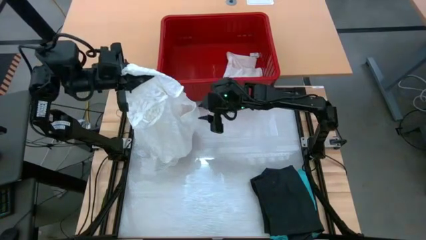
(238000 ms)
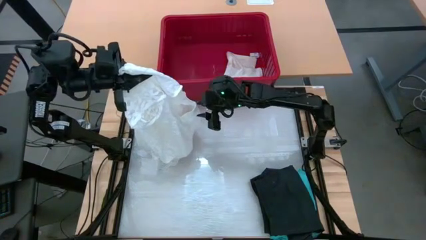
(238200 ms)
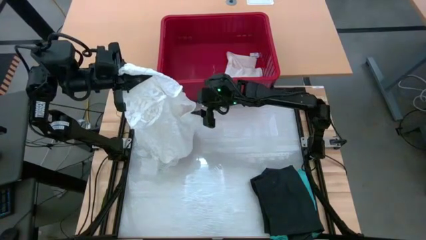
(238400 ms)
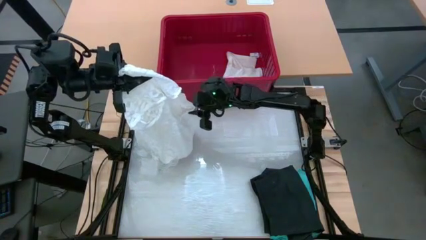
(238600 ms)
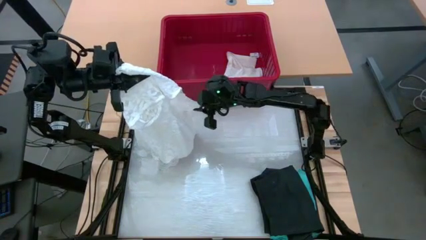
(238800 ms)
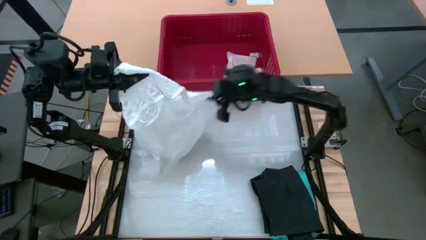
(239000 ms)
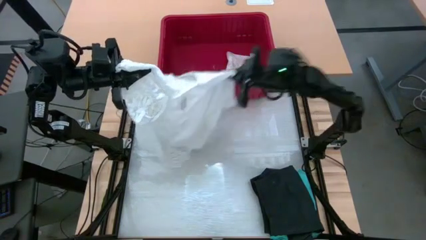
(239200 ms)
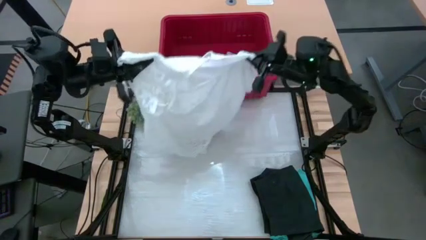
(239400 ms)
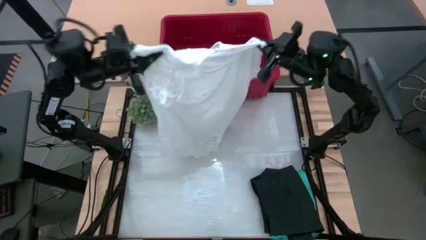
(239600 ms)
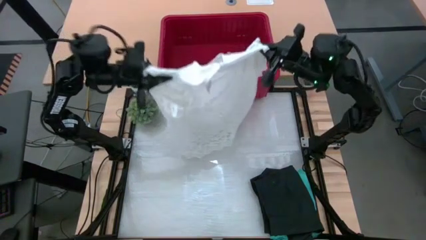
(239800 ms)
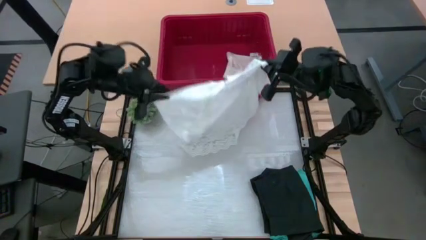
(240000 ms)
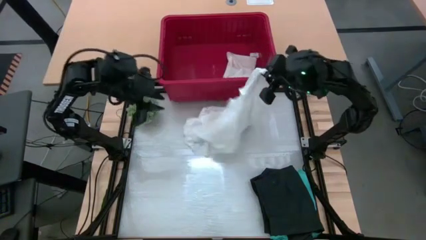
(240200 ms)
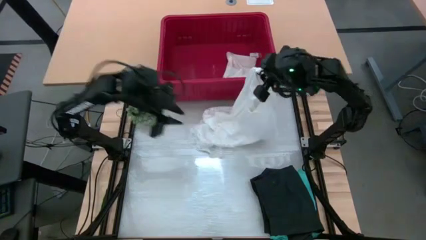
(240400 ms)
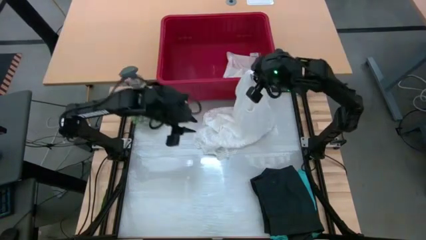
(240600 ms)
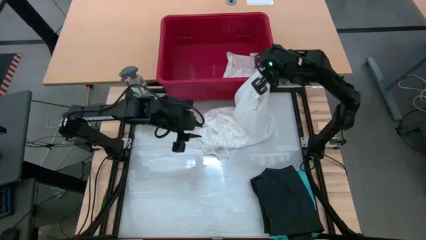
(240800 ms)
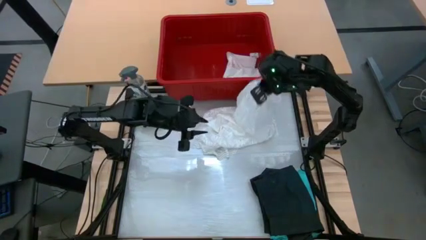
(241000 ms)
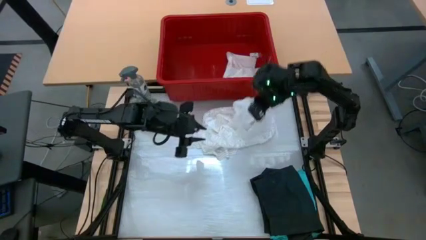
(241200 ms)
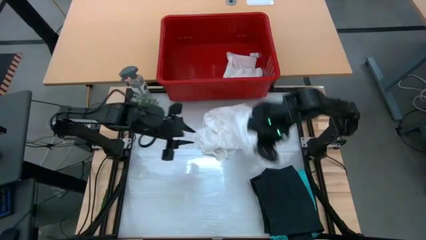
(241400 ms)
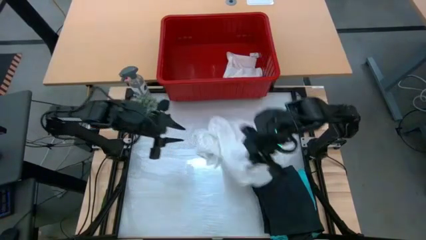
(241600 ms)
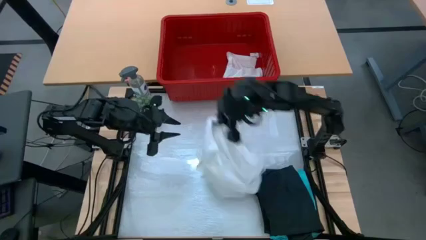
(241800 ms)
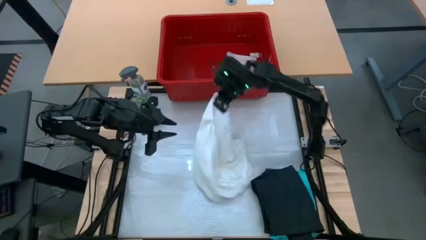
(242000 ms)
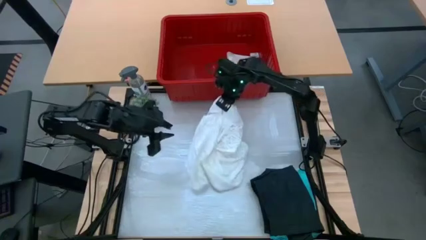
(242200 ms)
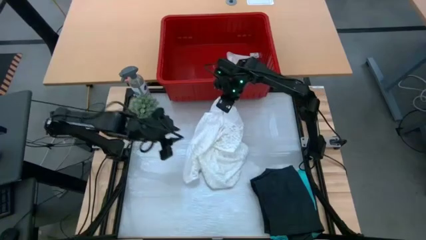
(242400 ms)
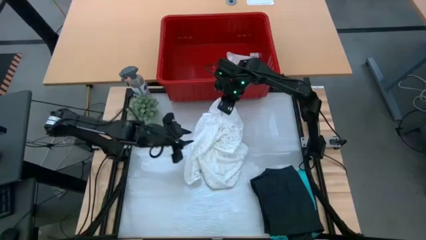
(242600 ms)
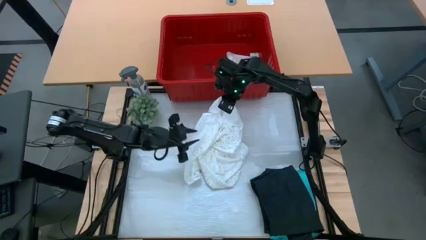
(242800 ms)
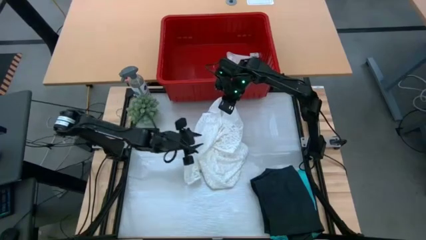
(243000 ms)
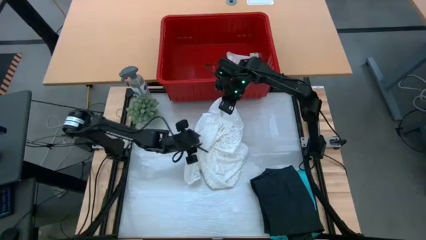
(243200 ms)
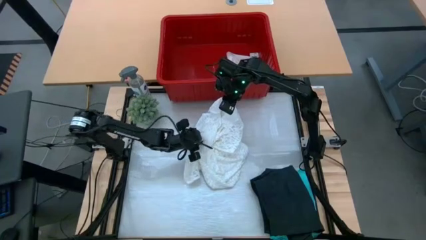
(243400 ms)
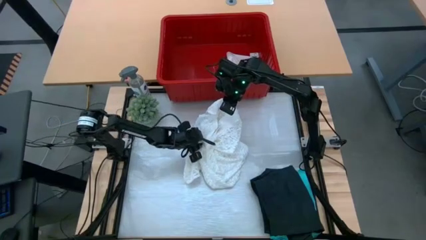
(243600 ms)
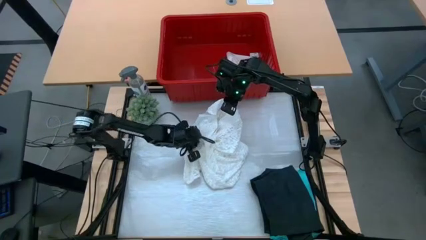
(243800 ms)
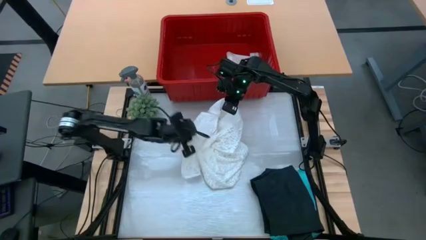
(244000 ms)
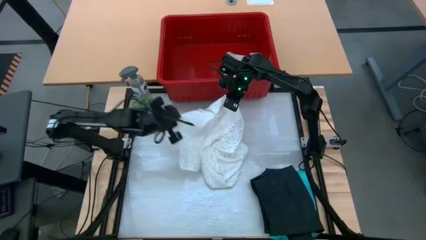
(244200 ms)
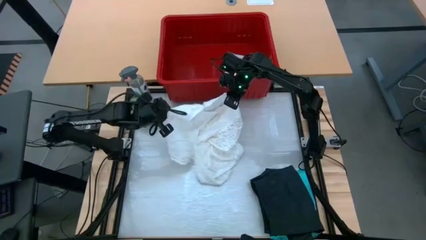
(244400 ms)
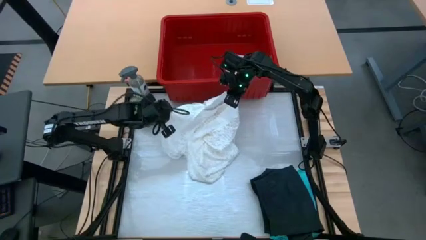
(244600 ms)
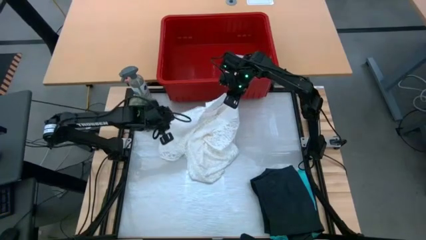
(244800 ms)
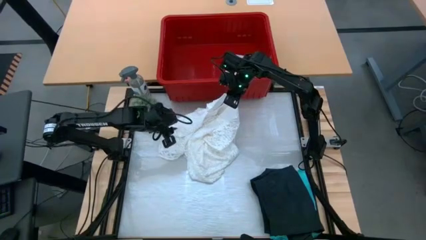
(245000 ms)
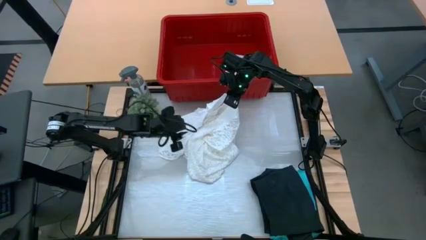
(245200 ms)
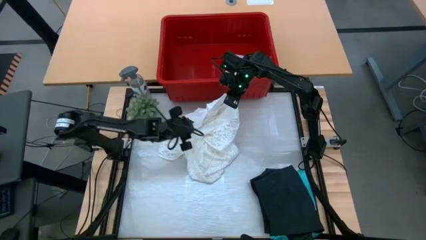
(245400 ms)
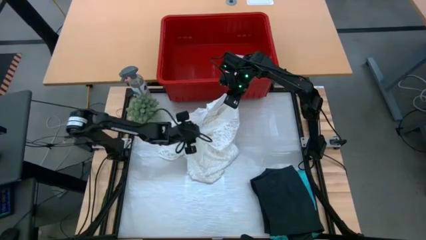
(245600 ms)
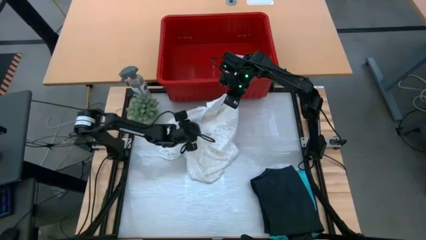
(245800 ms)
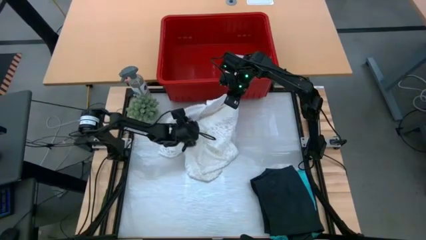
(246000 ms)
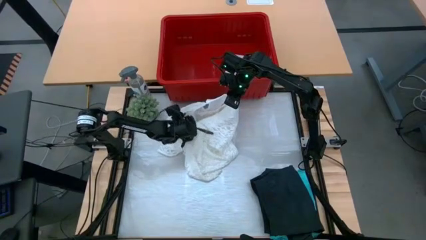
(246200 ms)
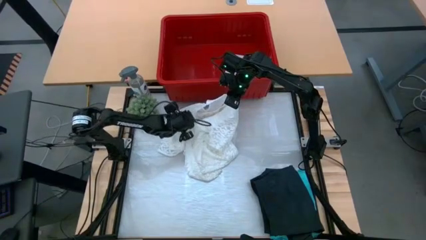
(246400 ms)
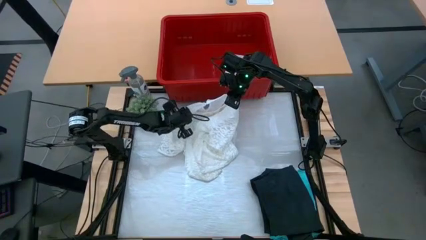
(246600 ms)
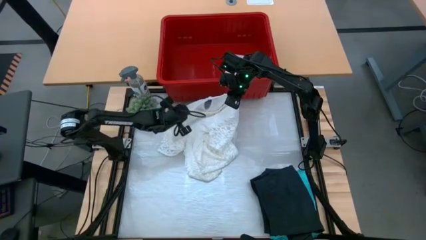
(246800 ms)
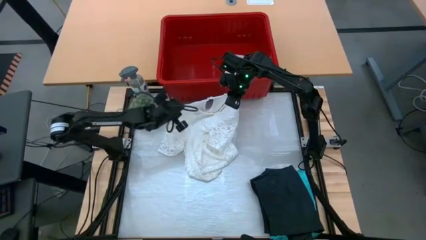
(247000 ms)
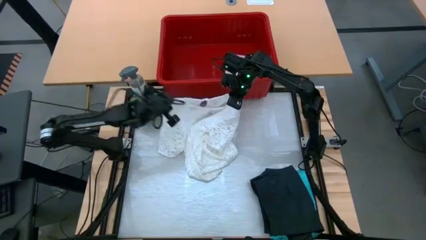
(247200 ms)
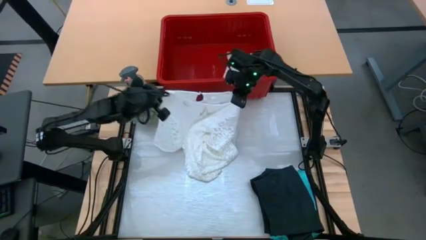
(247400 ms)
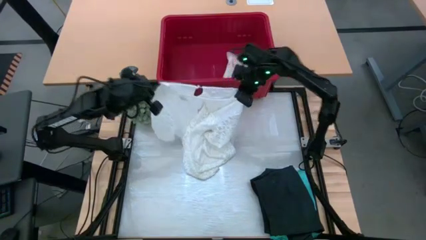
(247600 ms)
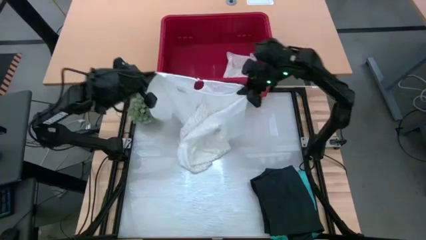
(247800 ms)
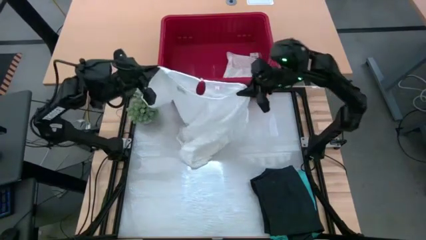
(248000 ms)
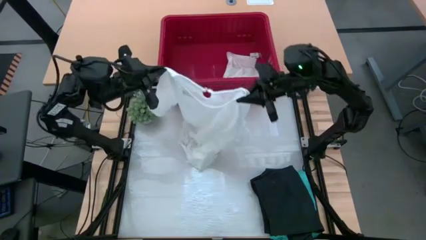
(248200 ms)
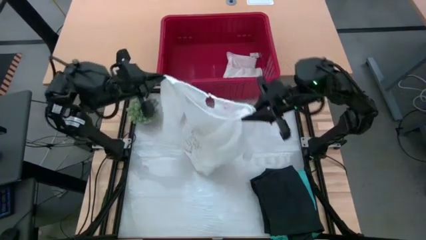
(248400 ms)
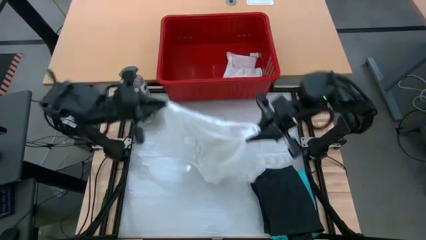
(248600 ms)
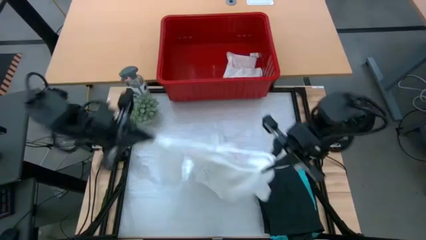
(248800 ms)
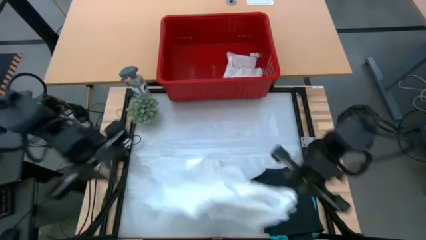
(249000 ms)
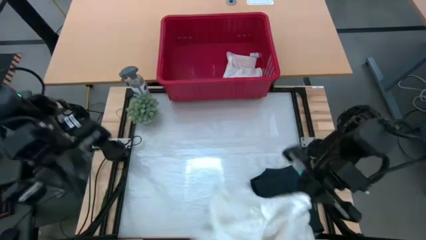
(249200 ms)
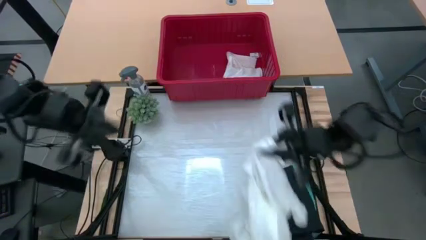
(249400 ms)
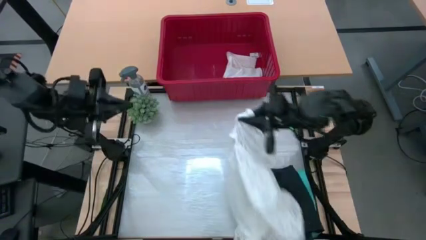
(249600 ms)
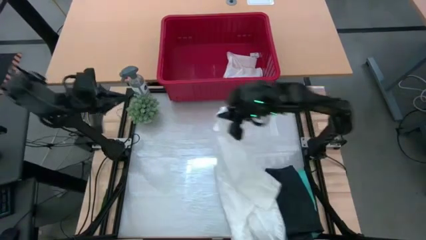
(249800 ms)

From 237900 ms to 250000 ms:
Task: Fold Laundry from Bin
Fold the white t-shirt

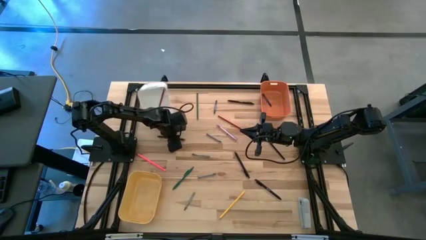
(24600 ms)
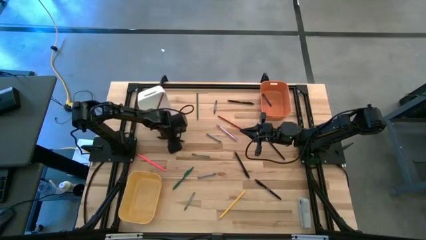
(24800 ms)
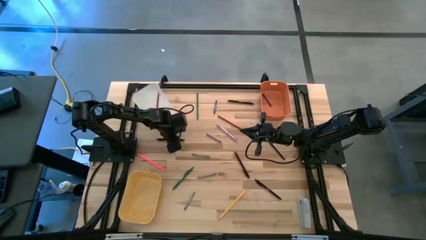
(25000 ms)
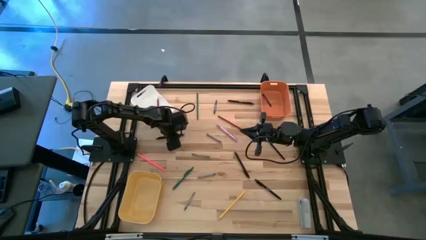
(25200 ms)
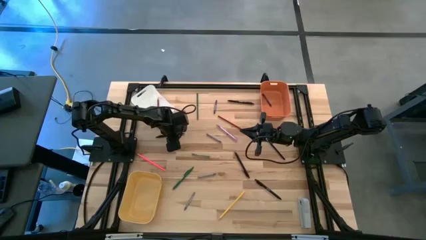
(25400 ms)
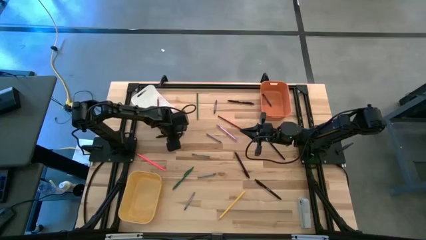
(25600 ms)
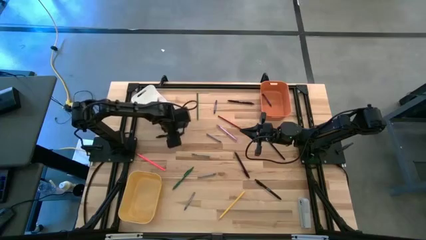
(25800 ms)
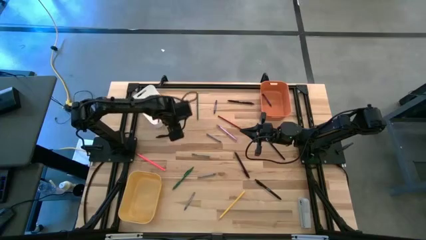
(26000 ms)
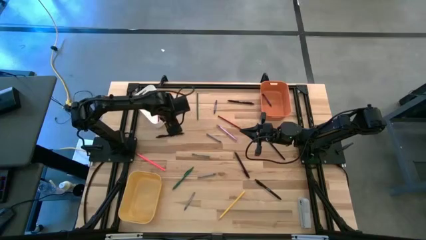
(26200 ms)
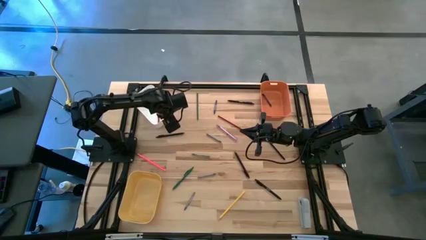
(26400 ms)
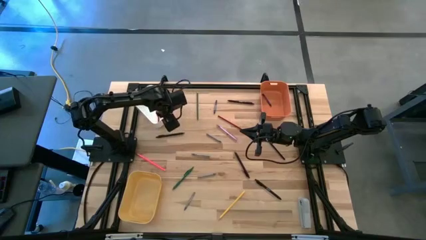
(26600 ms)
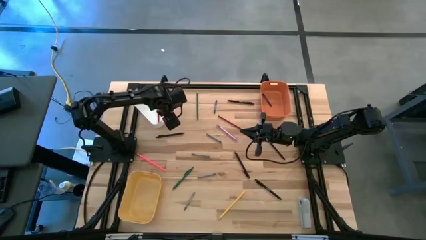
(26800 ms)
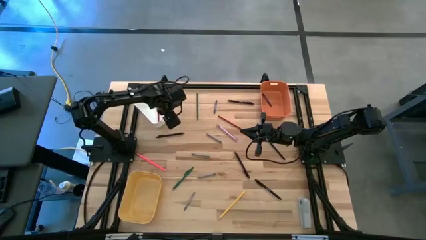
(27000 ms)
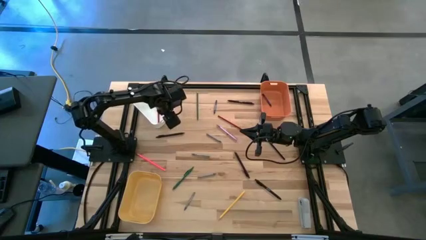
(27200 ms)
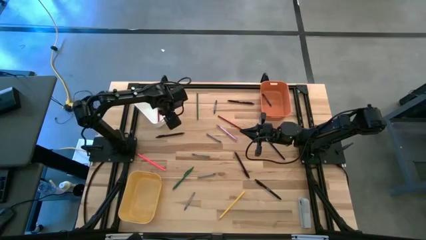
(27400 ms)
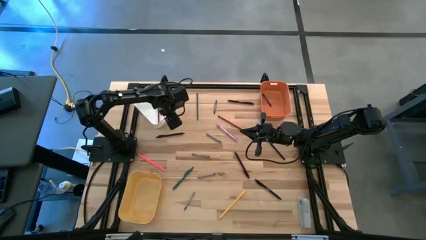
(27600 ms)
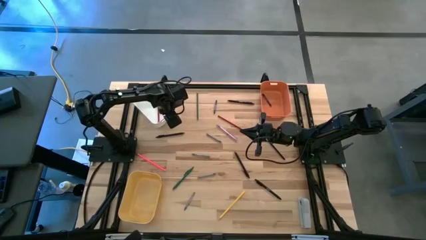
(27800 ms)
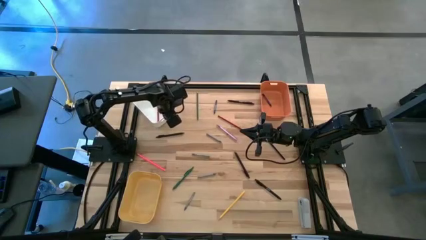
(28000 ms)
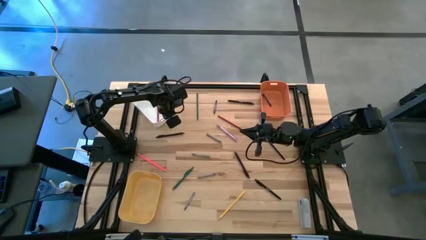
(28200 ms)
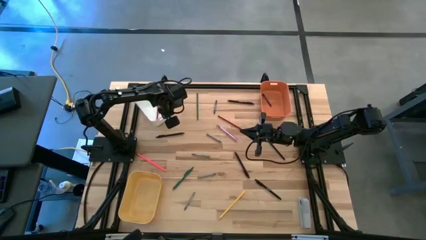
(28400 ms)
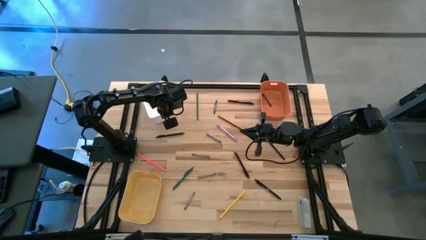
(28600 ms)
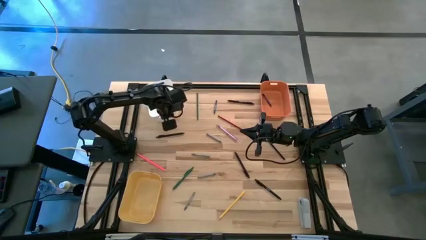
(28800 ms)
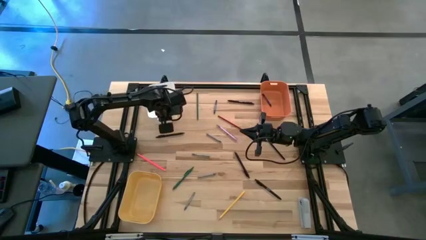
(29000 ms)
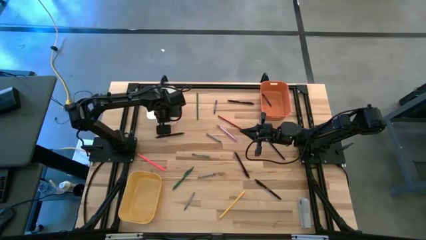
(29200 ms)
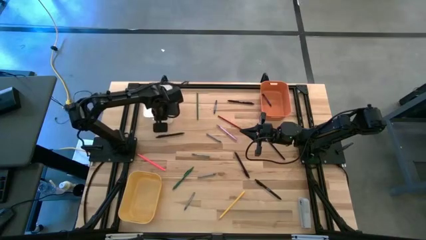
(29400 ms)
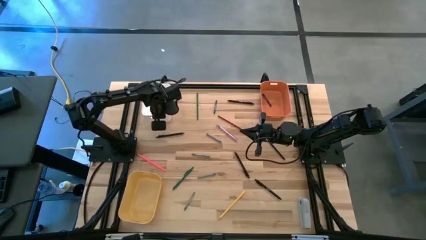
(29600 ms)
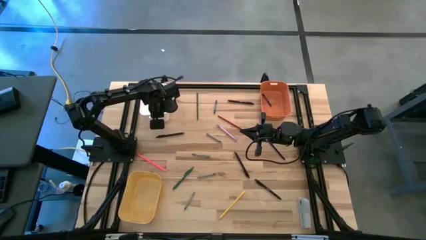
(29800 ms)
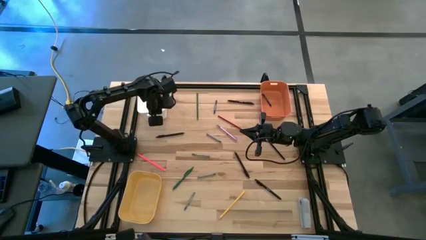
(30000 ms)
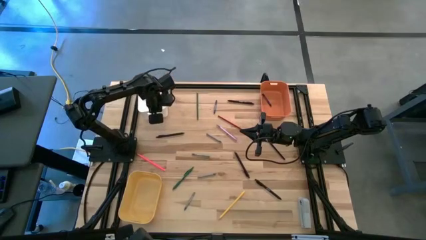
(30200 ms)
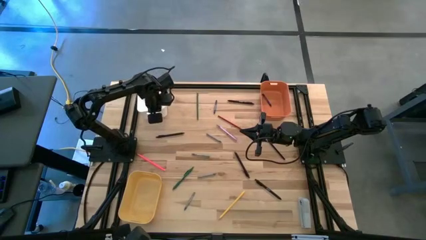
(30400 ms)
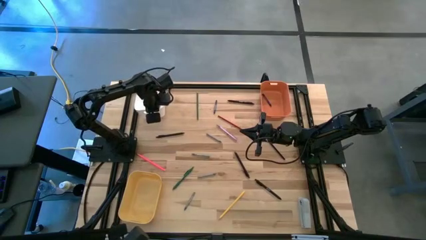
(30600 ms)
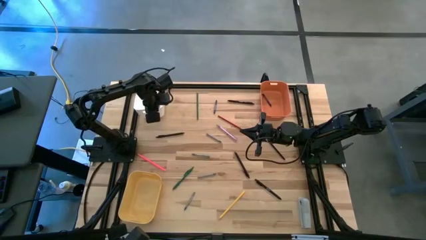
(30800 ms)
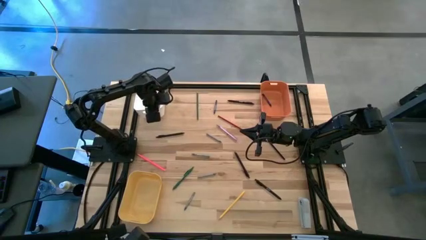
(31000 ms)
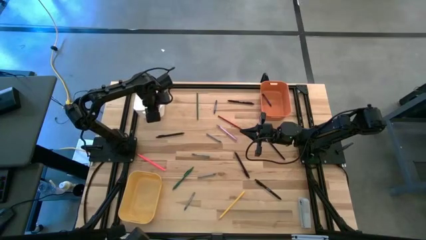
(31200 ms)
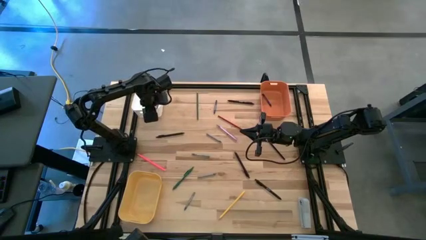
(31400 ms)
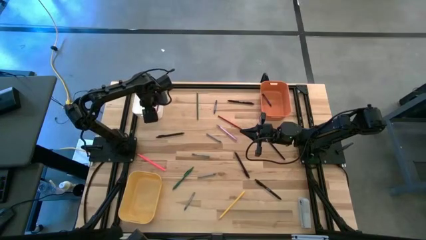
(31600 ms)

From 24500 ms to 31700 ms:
Task: Sort crayons/erasers/pens/pencils in bins
Adjust the white bin
